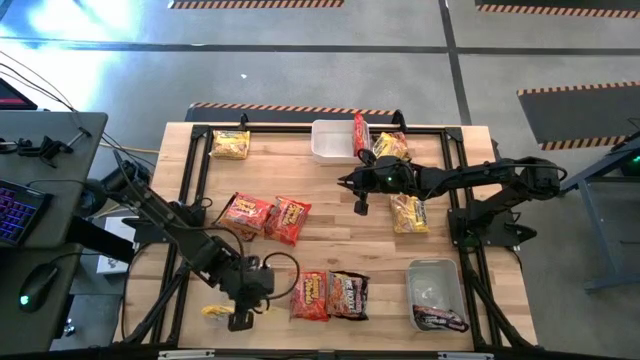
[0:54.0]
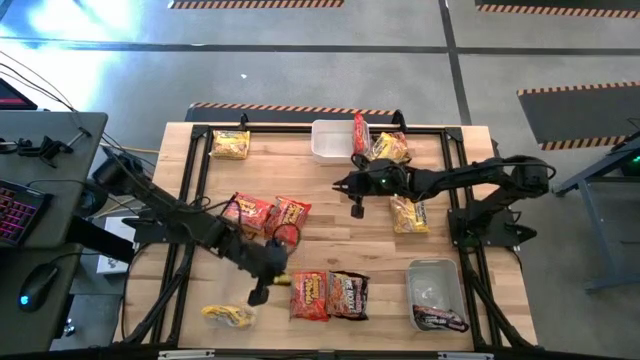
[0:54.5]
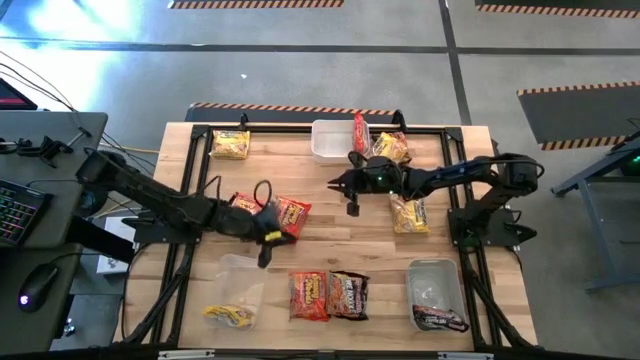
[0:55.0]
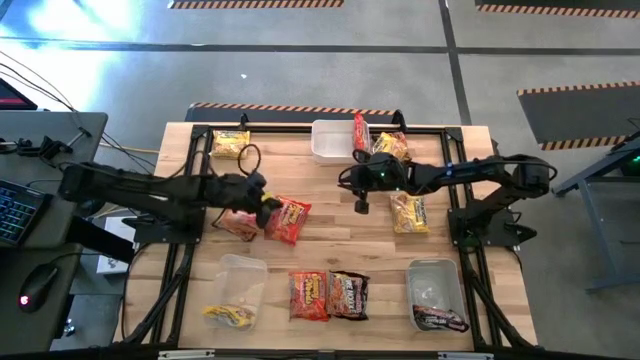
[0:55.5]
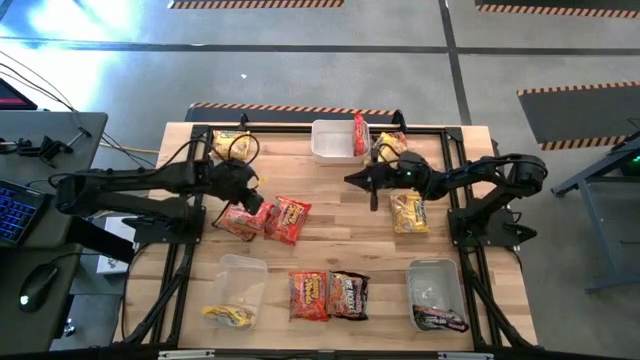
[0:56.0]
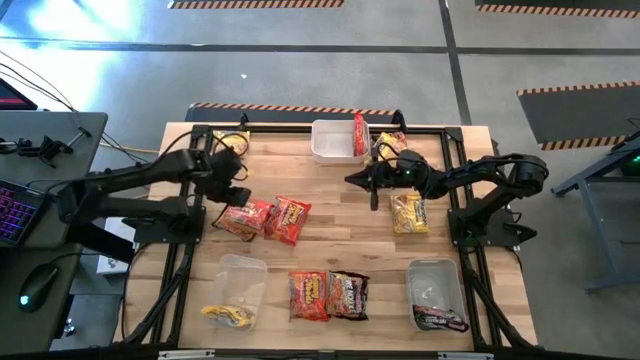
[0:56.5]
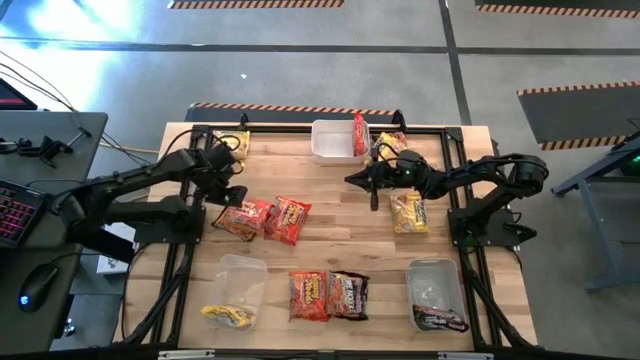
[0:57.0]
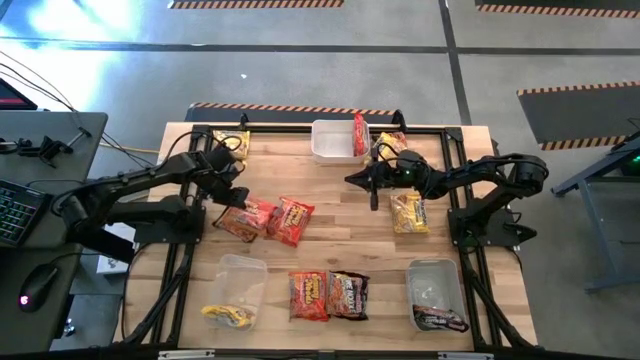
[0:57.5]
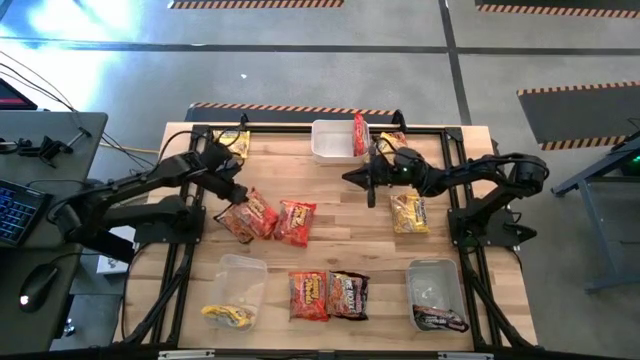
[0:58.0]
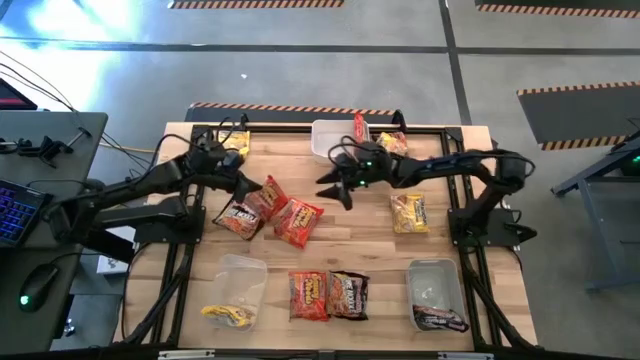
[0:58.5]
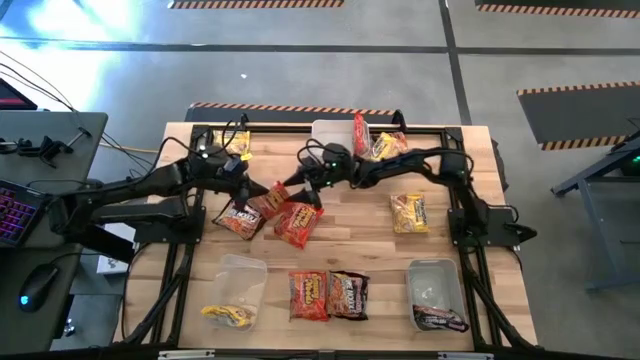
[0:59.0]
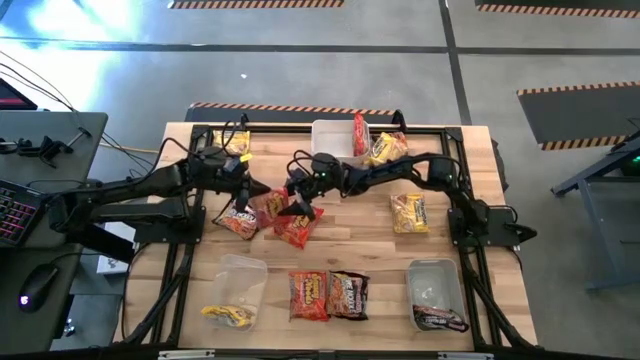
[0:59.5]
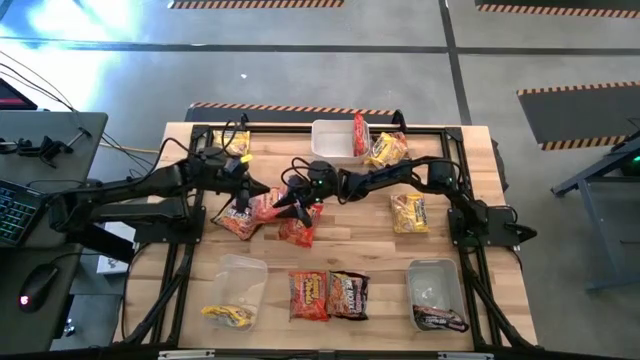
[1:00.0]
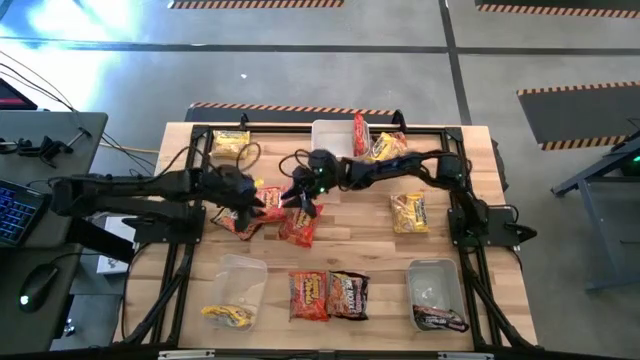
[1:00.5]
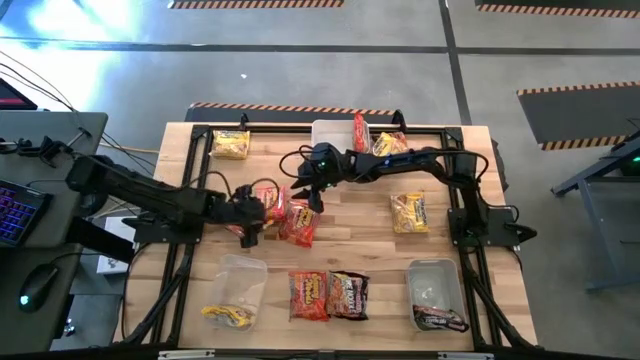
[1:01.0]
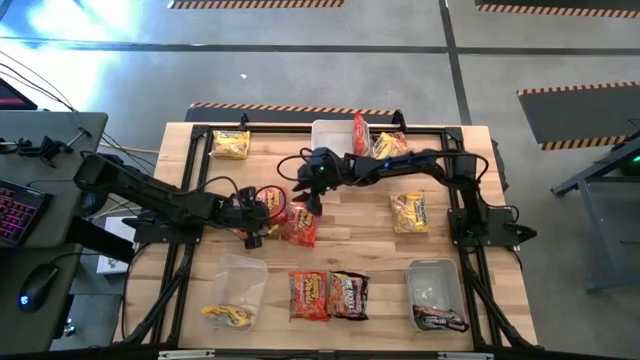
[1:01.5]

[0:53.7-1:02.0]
Task: Sort Maruchan noodles
Put the orange noodle pack into the white bin

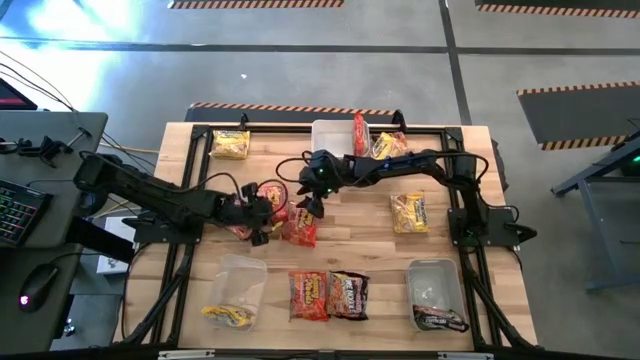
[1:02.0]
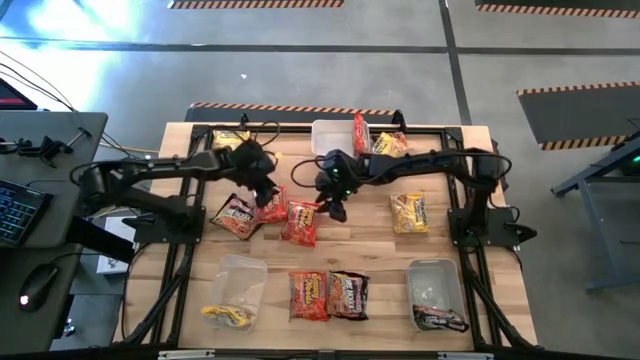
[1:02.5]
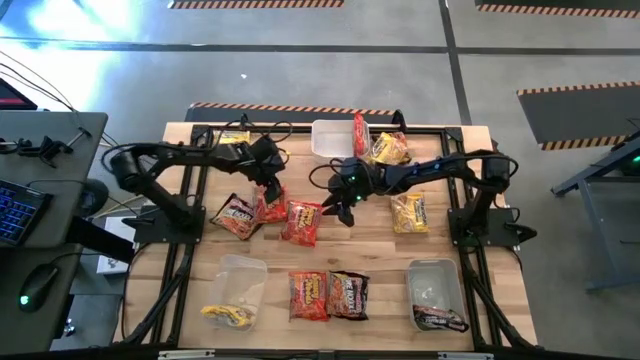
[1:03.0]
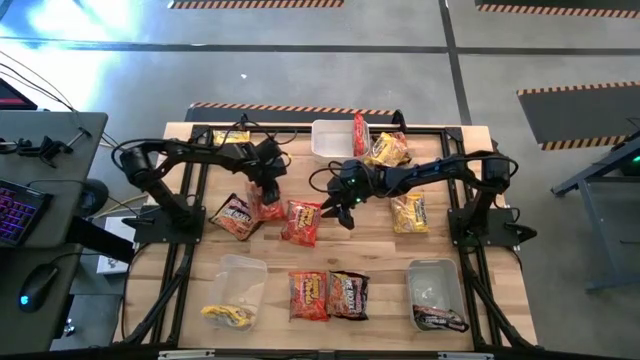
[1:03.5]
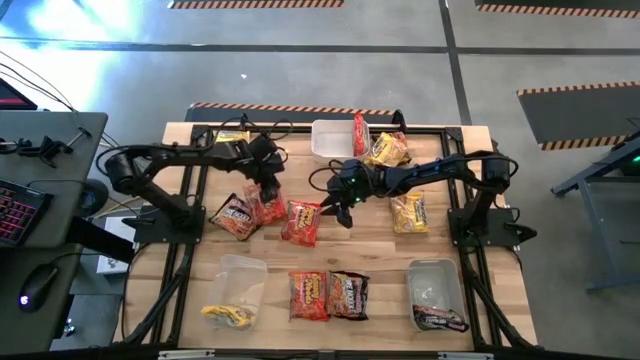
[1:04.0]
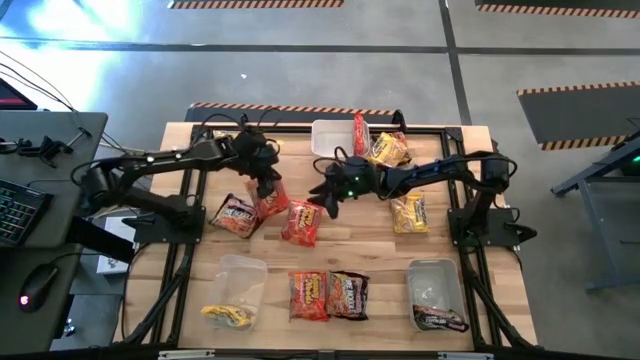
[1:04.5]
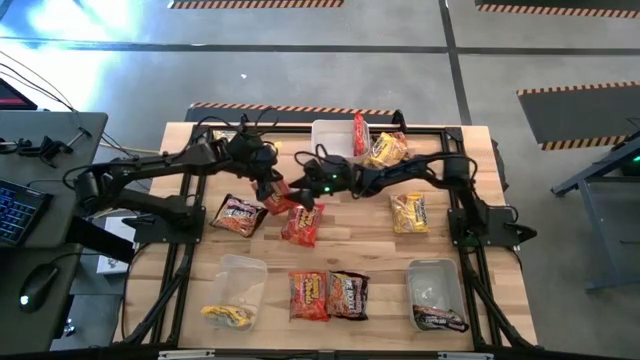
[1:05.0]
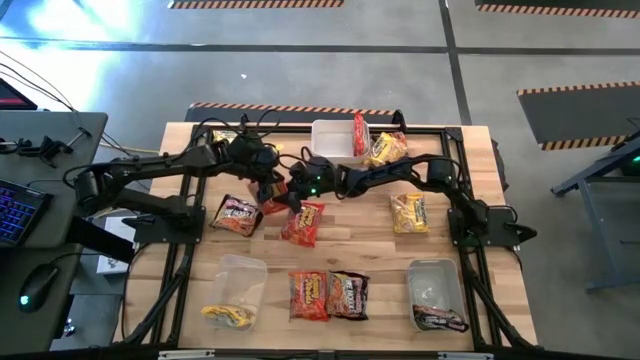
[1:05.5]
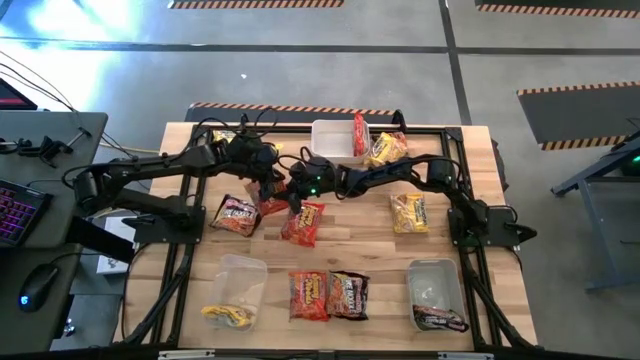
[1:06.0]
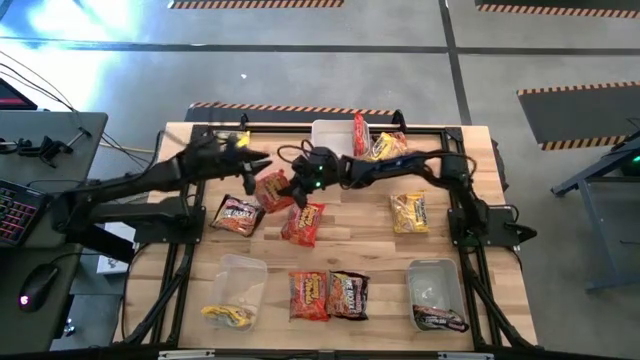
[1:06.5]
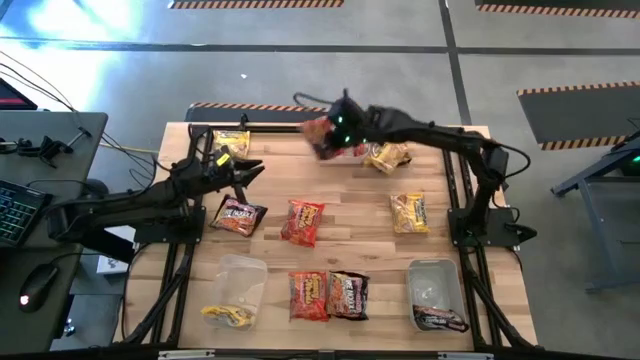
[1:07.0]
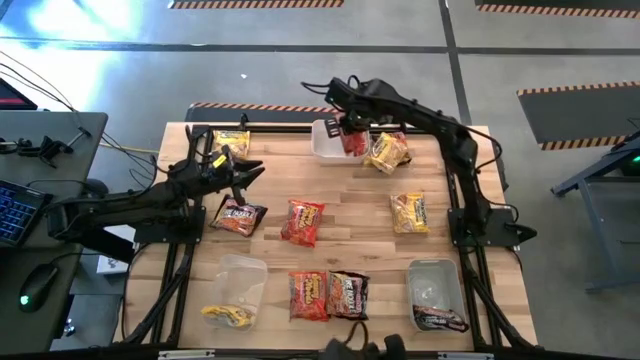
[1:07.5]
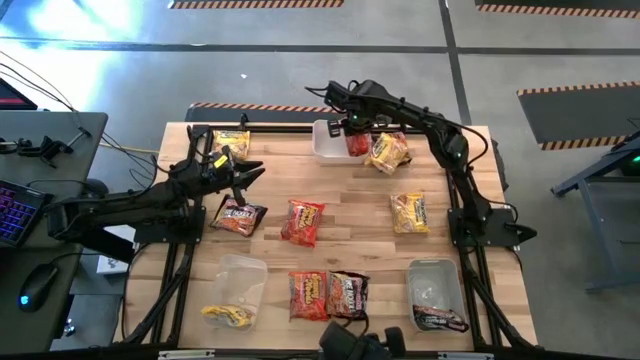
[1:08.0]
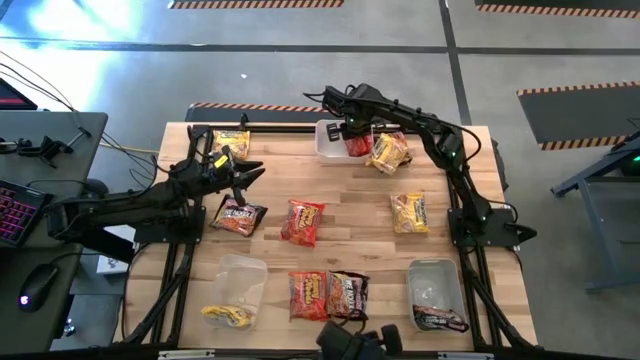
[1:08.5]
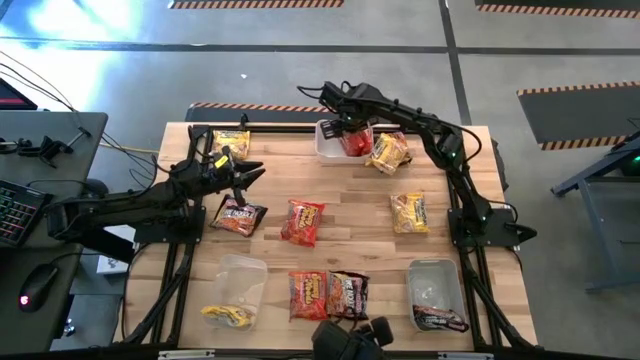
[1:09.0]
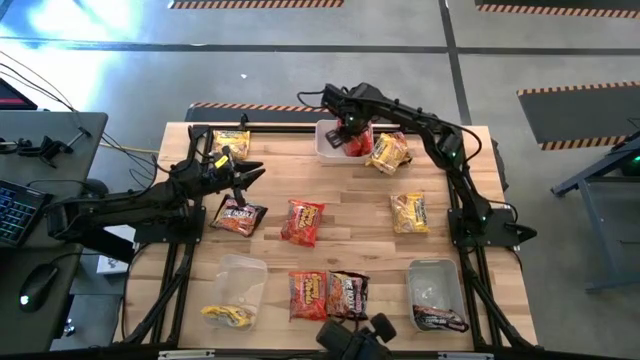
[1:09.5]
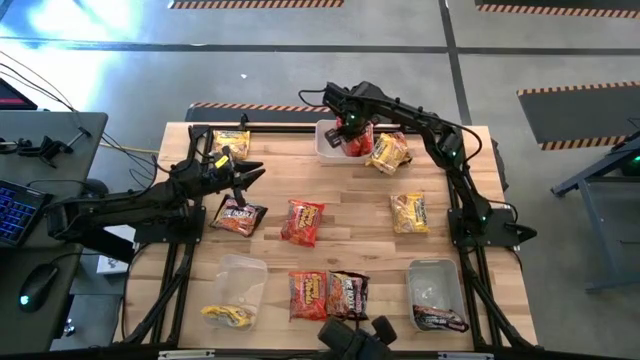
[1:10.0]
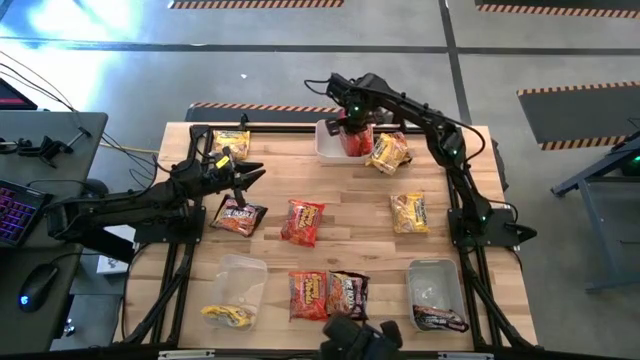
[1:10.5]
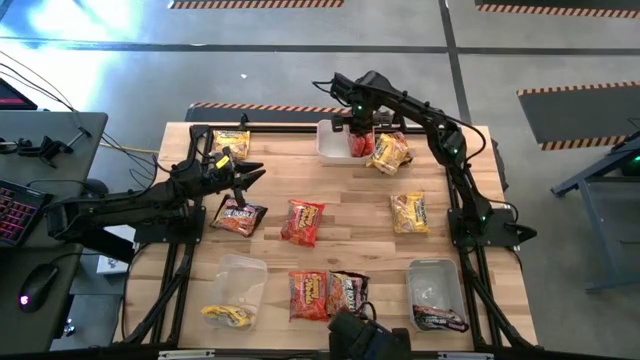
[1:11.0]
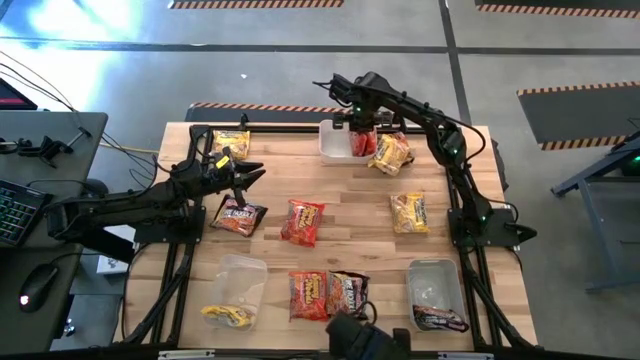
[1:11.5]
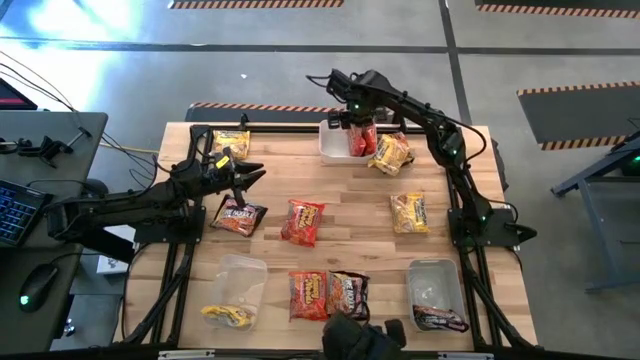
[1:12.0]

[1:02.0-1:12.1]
Put the orange noodle pack into the white bin

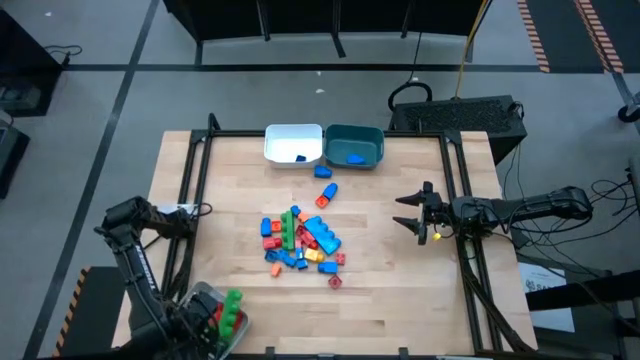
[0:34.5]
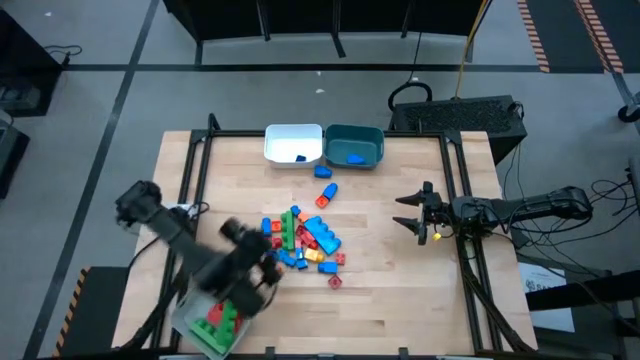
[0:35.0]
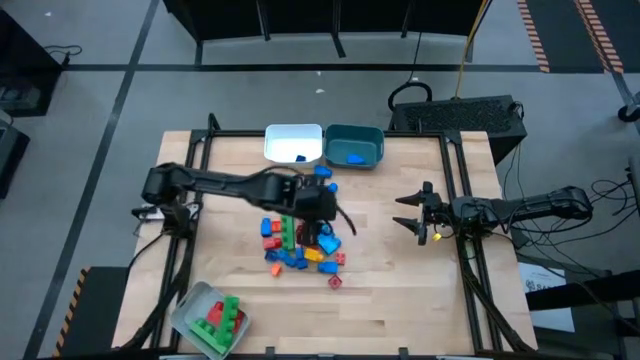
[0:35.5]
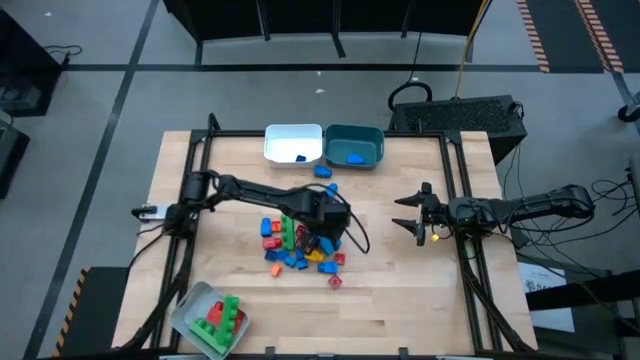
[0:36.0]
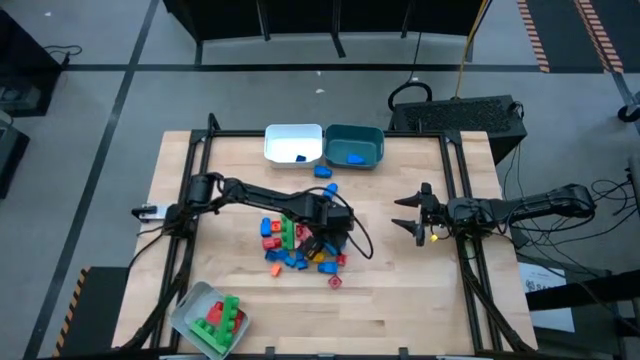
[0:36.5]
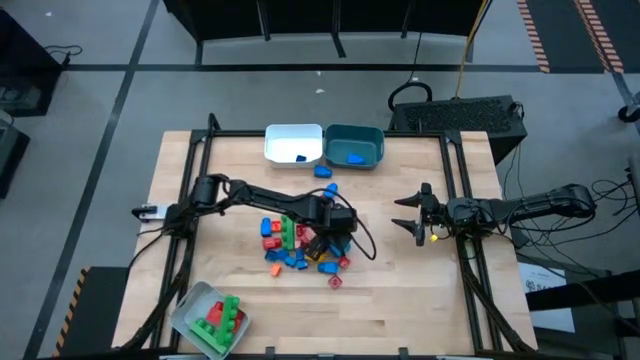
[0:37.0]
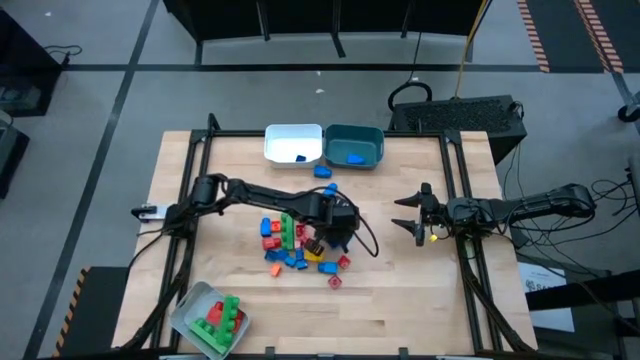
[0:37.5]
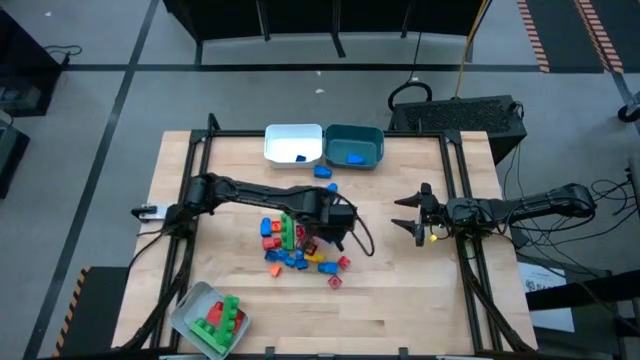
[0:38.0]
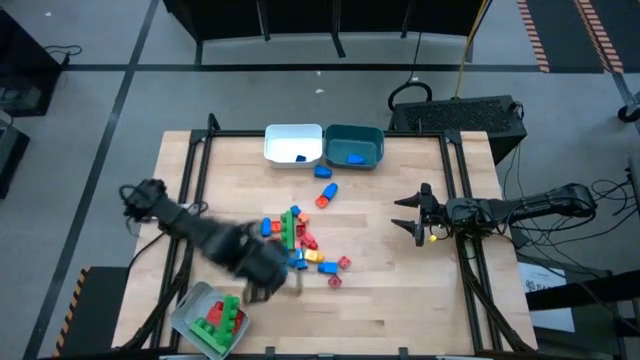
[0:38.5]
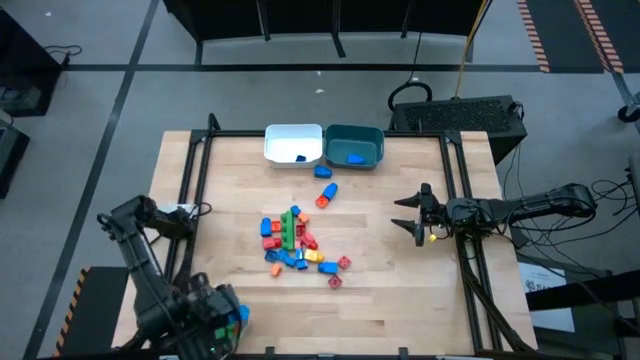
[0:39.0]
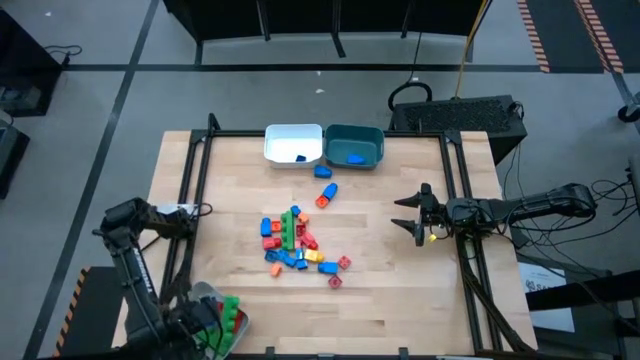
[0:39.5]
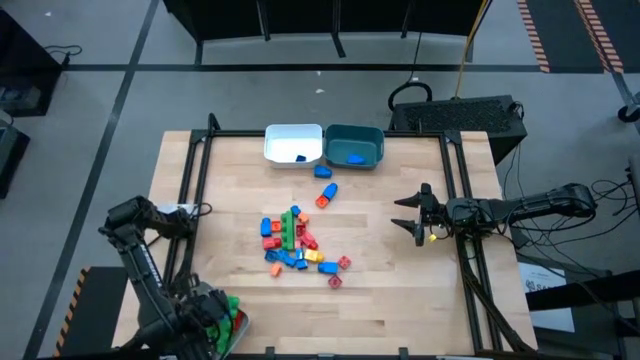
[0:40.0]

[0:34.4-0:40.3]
Task: Sort blocks by size
Put the blue rectangular 4 stud game piece into the gray bin
